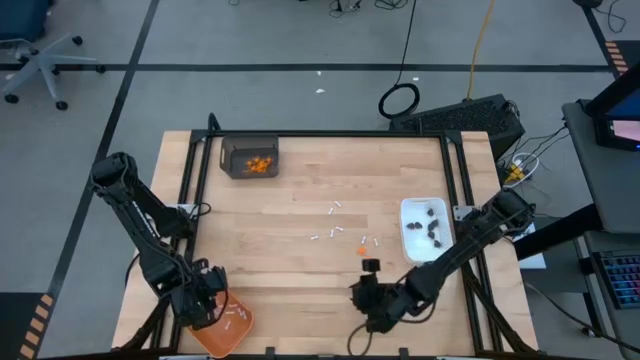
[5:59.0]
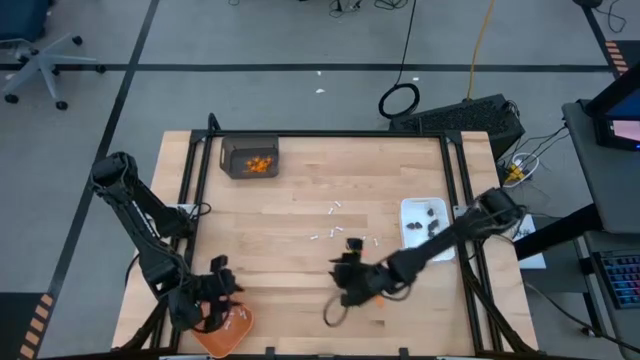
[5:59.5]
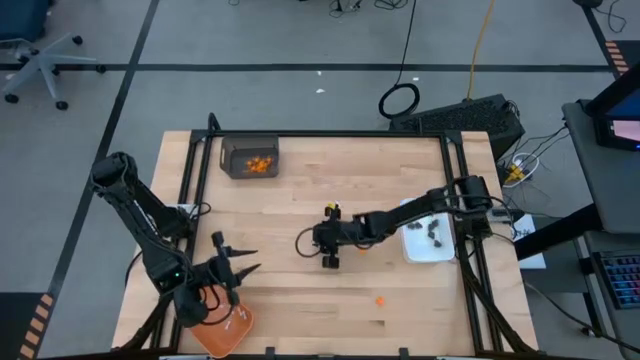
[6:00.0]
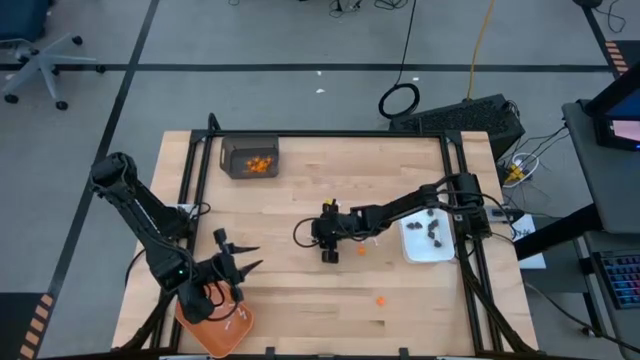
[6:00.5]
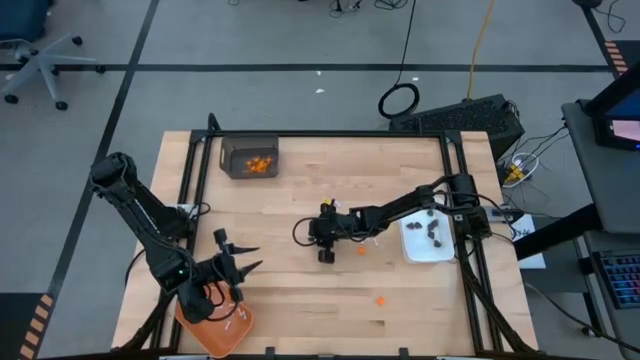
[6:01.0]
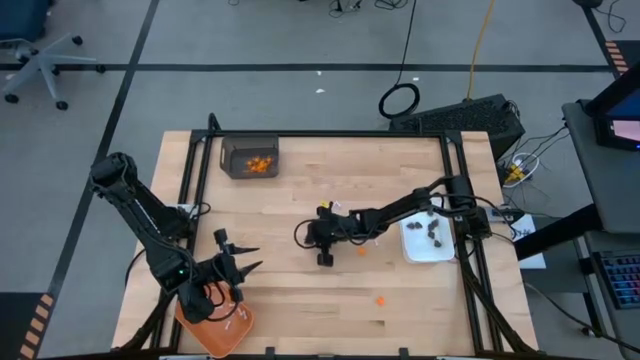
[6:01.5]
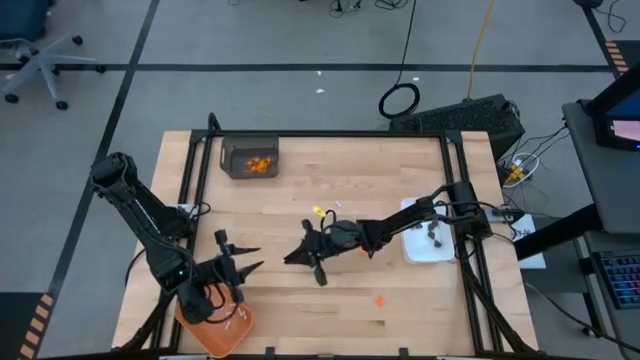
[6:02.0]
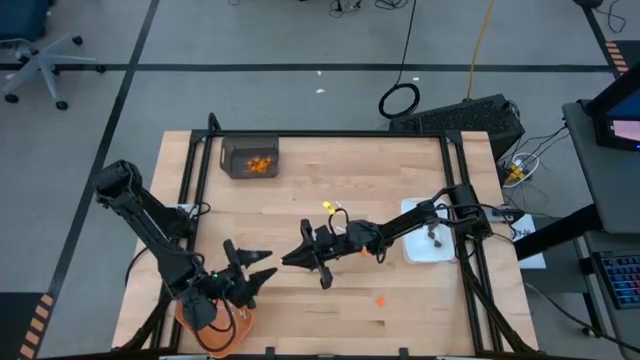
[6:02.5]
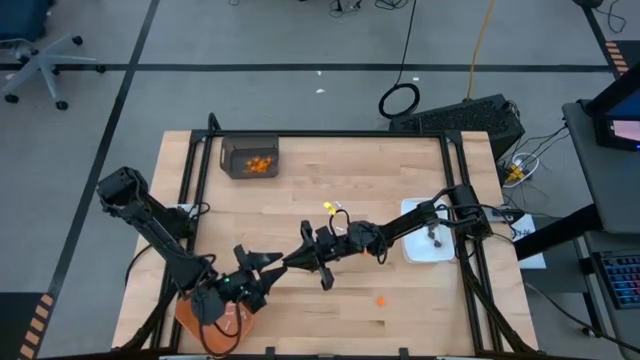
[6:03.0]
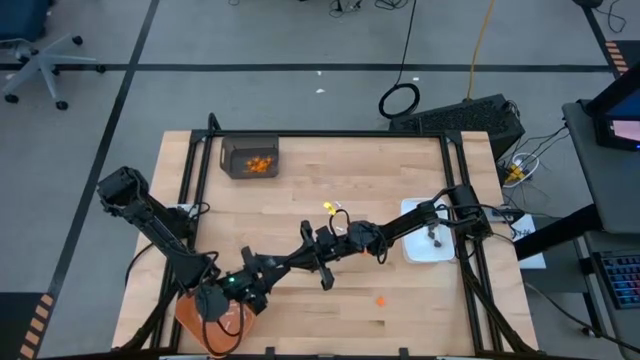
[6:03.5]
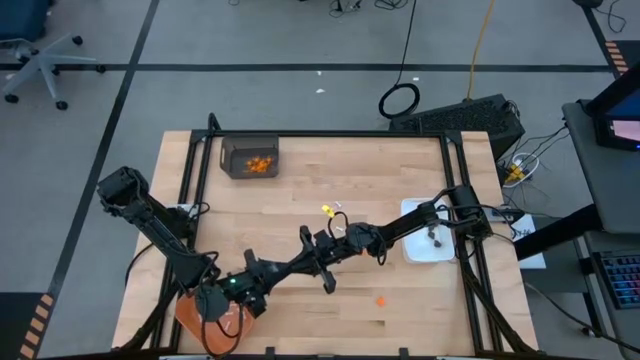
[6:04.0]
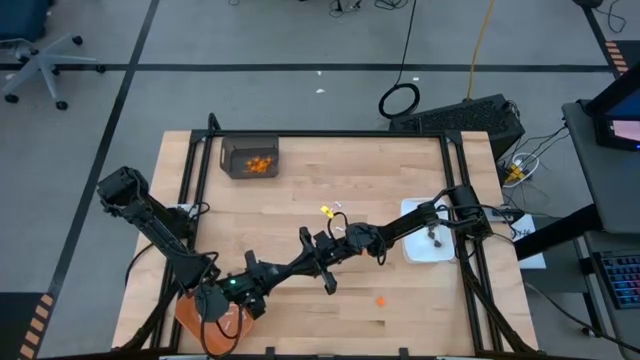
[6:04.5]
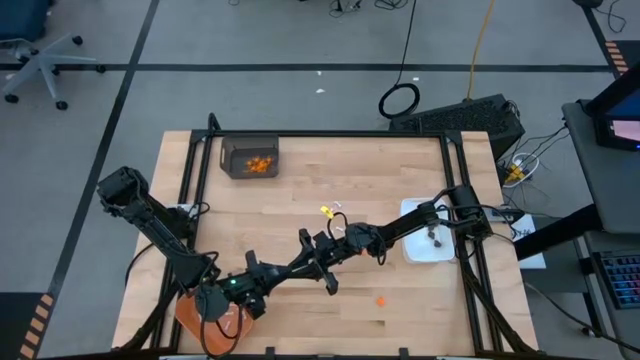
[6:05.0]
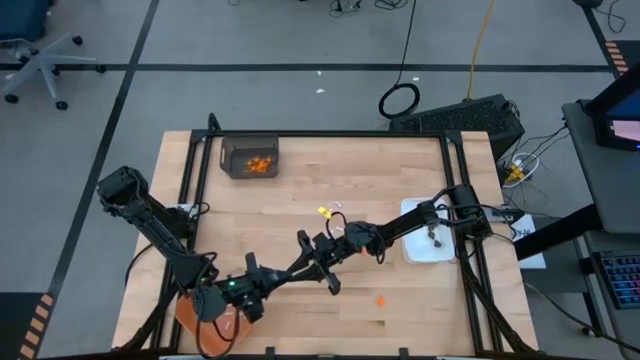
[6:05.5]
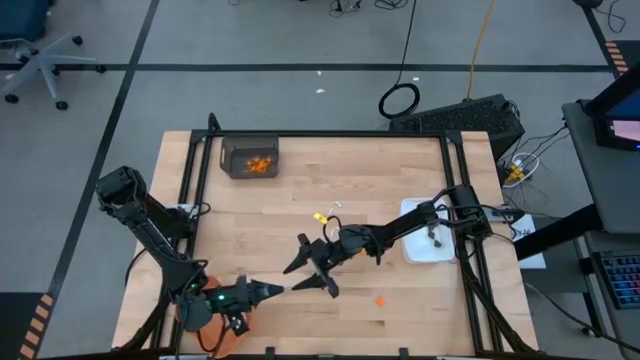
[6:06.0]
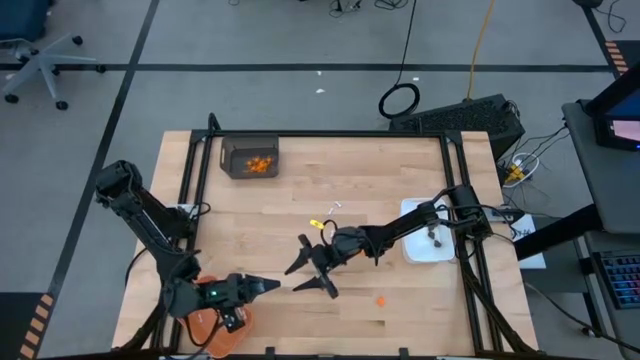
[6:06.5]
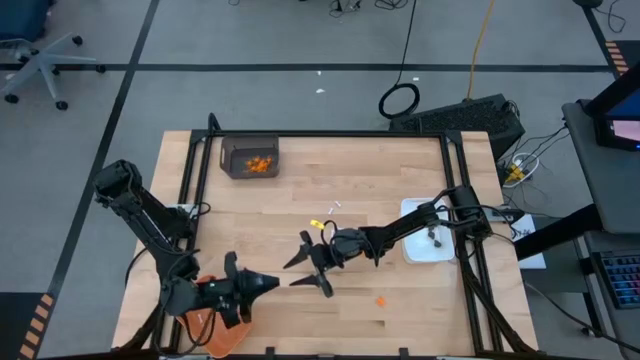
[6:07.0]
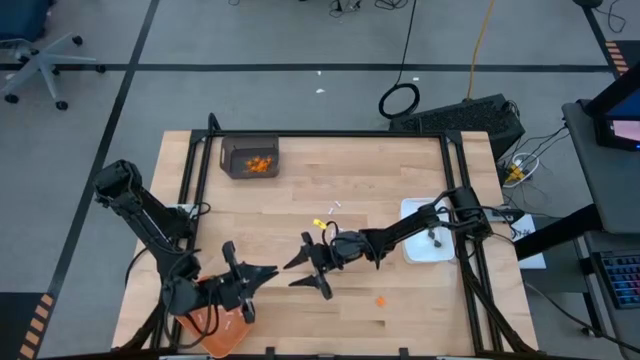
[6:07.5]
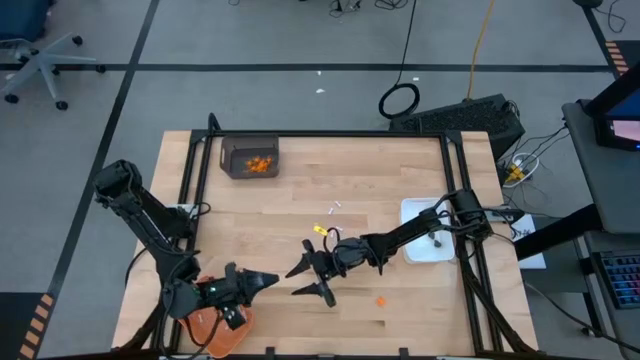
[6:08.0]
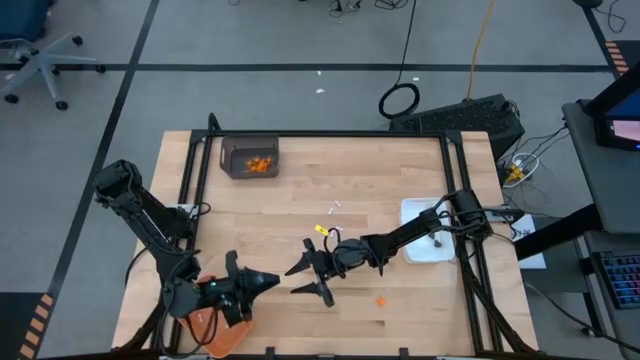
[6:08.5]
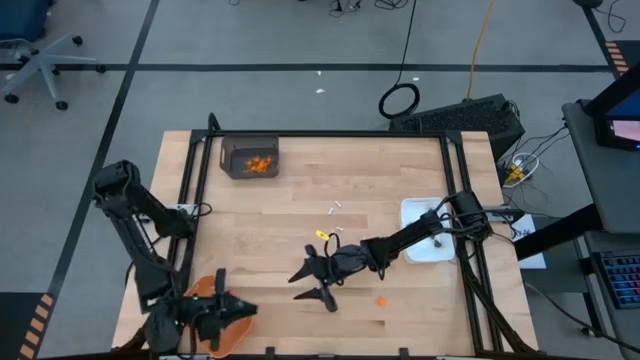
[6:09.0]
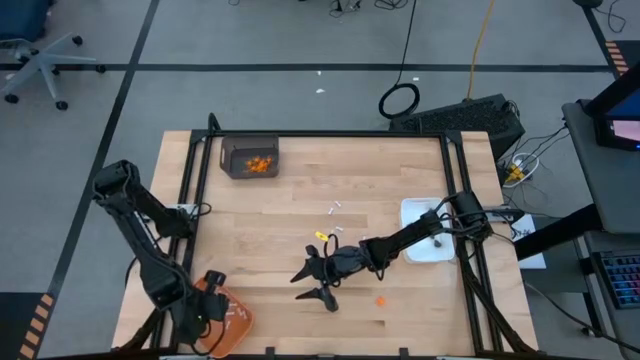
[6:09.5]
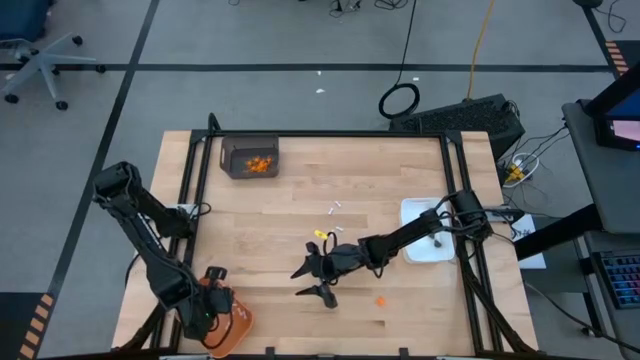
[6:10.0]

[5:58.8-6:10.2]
Task: Sort Halloween decoration
Put the white bone toy into the orange bin

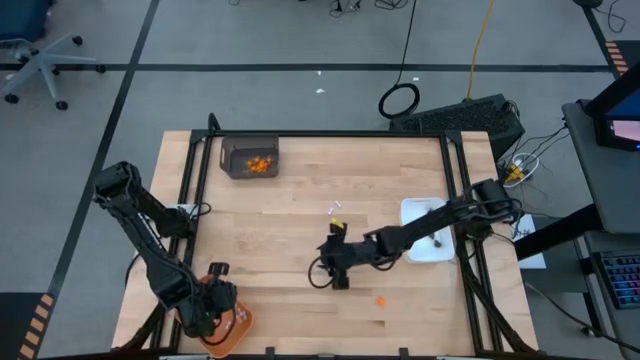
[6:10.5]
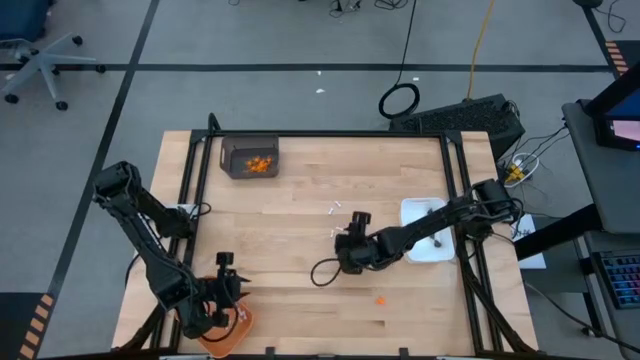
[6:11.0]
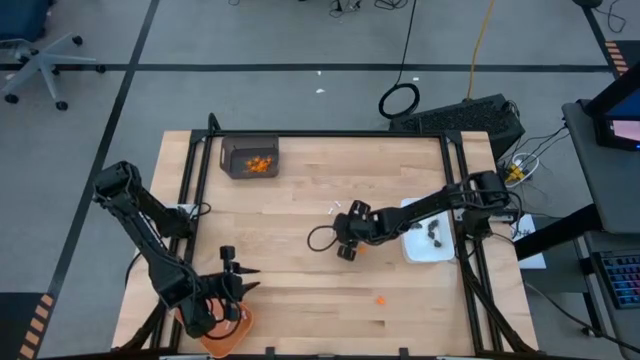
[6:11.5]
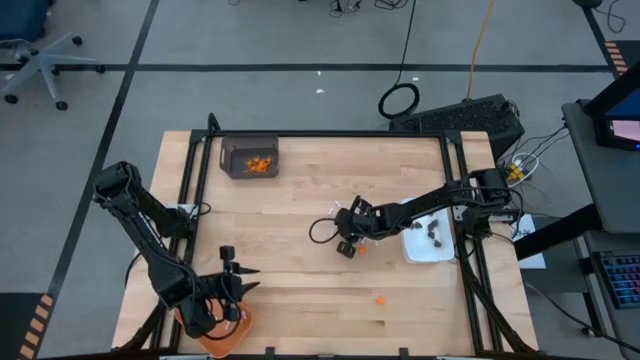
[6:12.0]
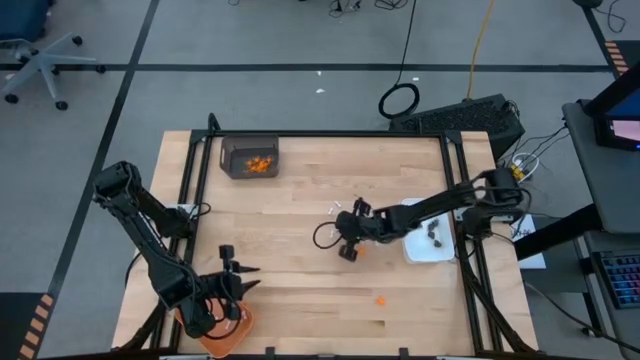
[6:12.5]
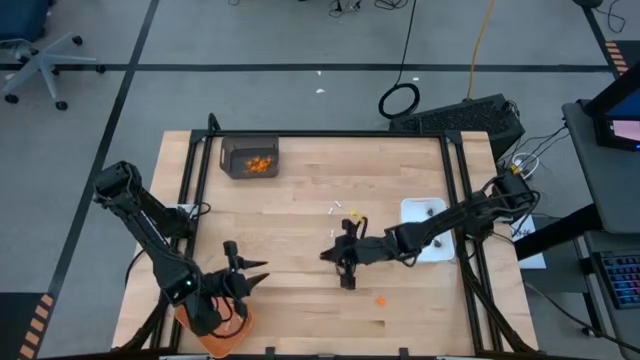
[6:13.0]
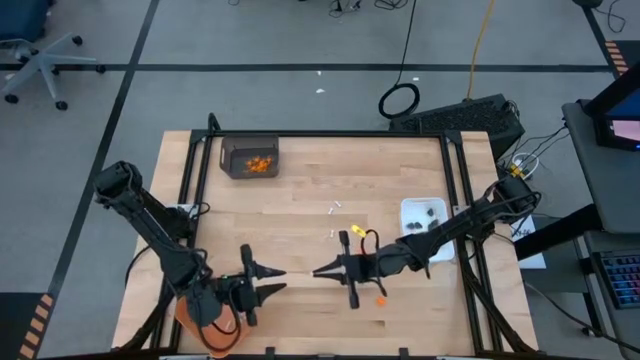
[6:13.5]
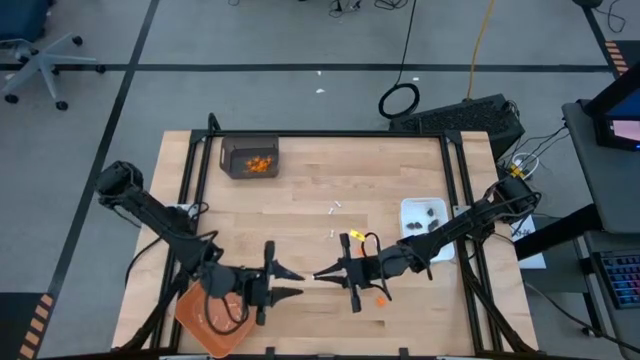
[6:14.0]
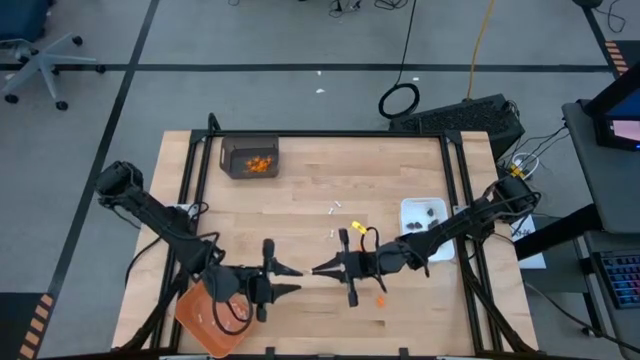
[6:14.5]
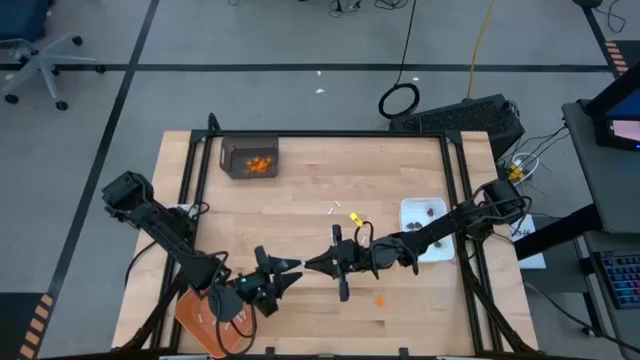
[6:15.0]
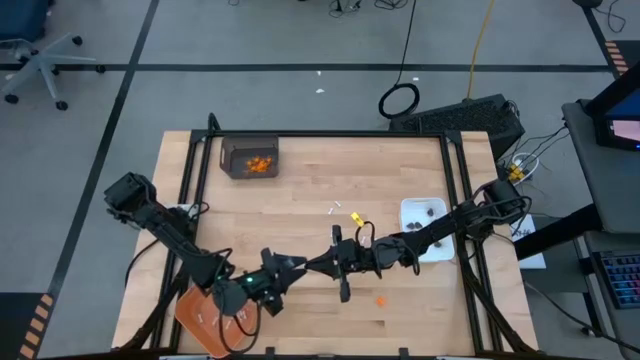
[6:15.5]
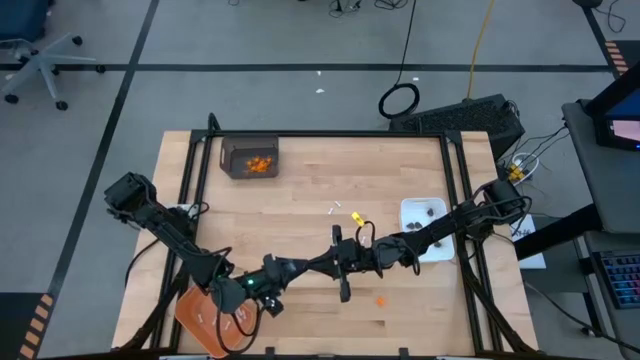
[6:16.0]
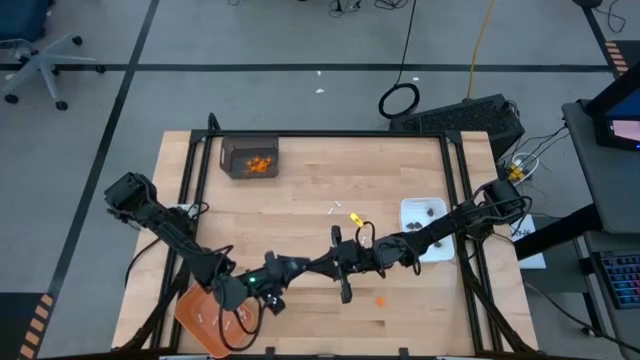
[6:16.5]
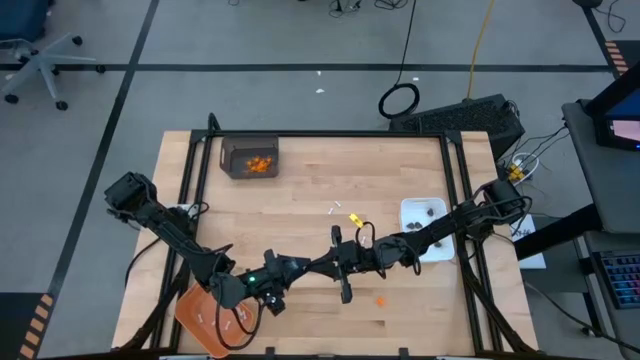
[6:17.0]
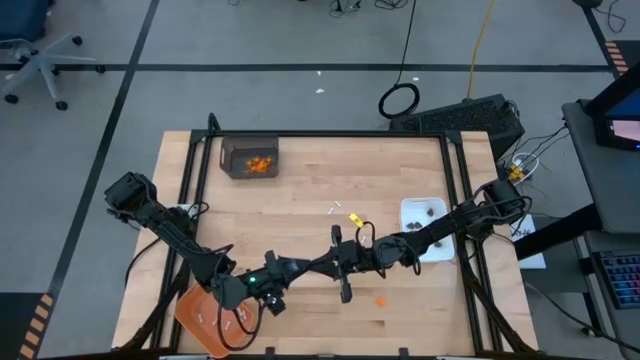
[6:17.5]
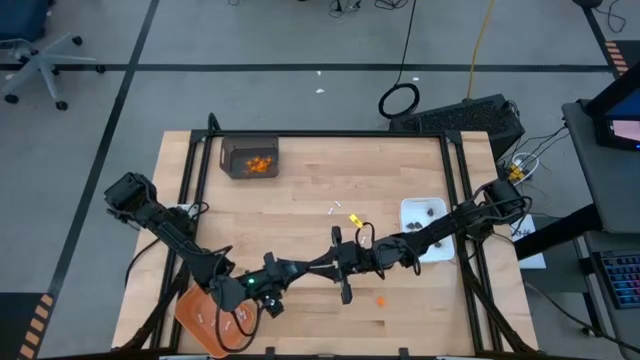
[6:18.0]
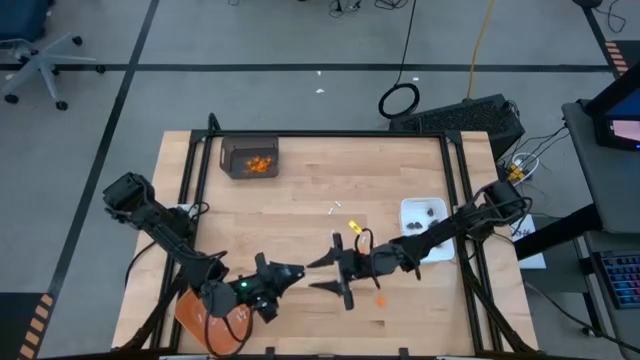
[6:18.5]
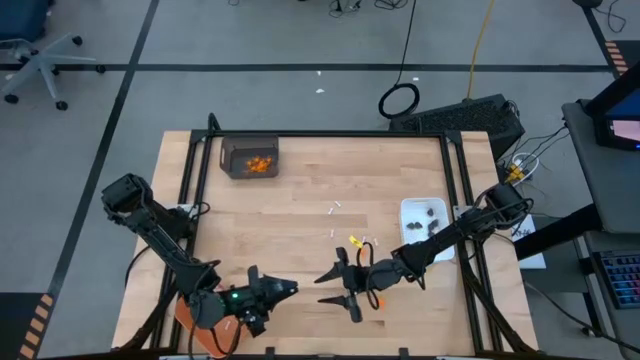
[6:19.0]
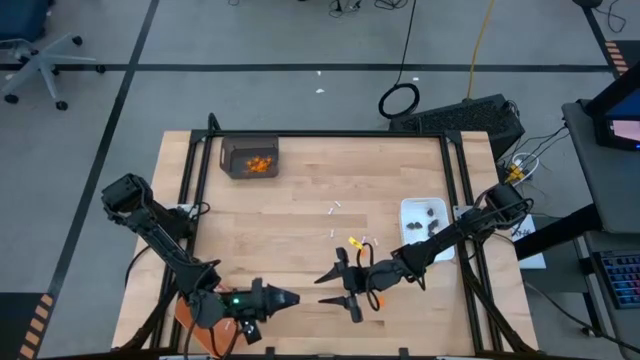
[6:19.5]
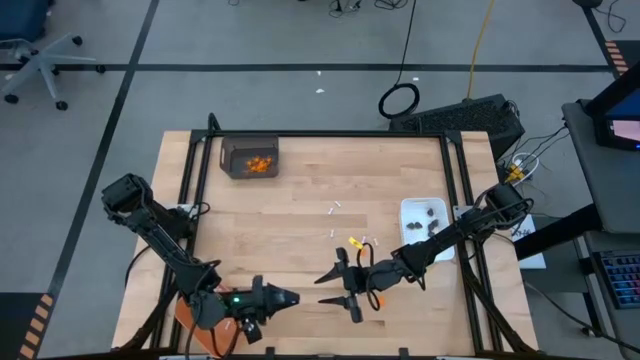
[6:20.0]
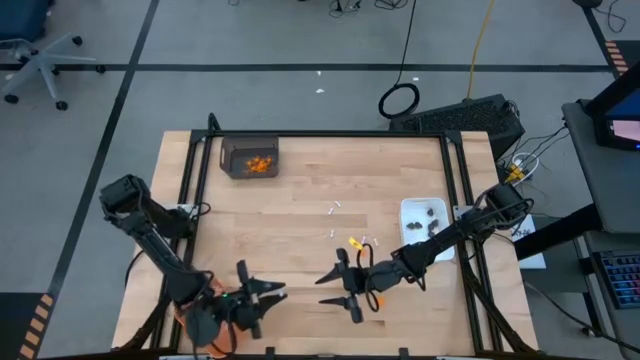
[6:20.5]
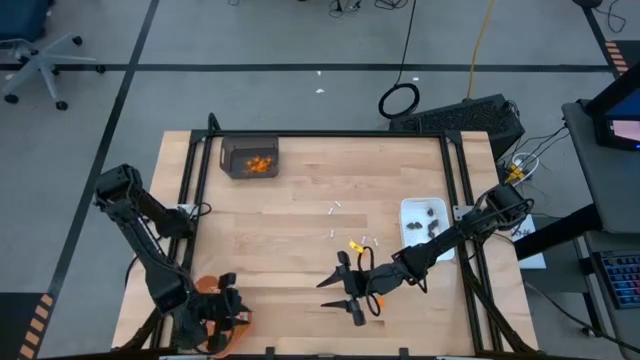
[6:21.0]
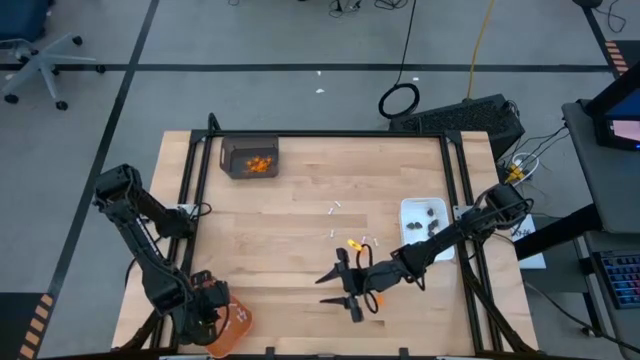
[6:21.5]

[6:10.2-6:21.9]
Put the white bone toy into the orange bin
